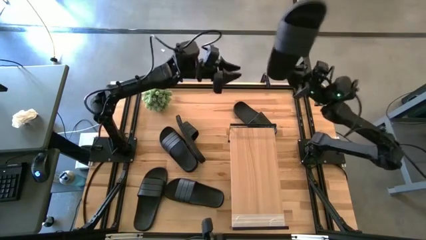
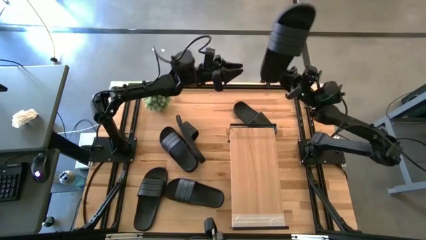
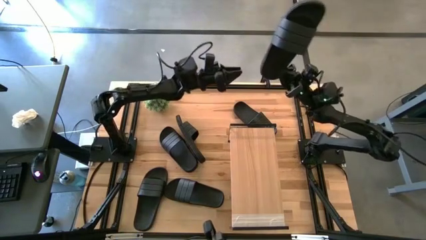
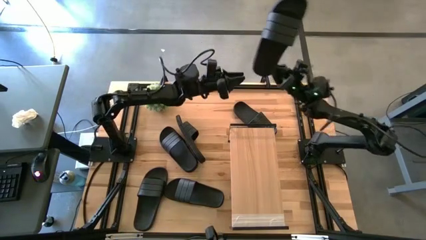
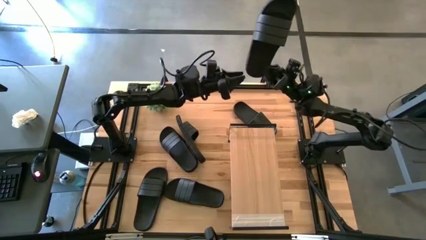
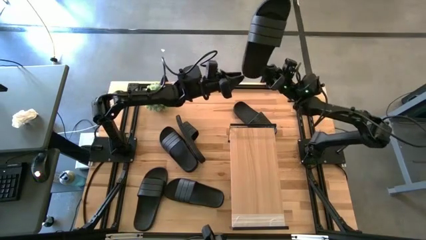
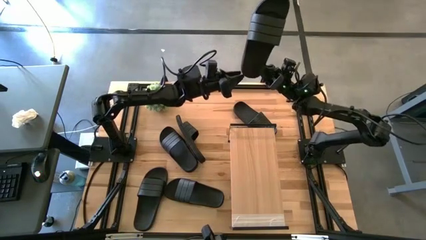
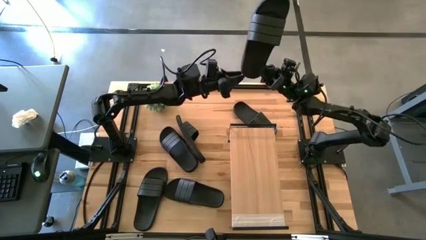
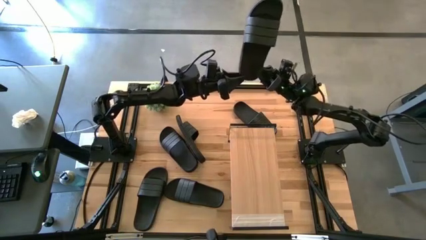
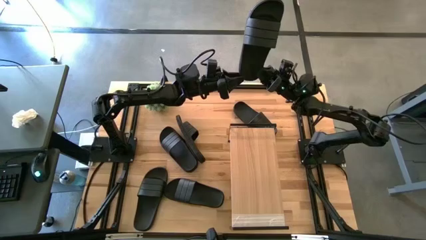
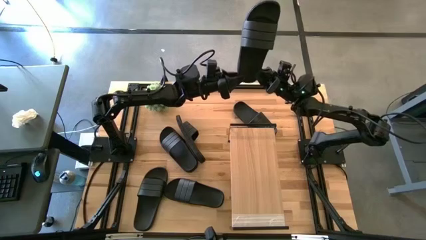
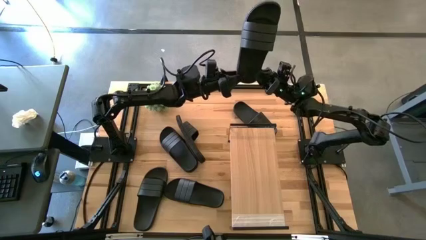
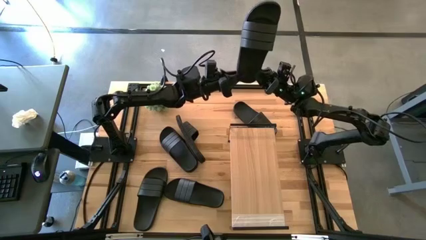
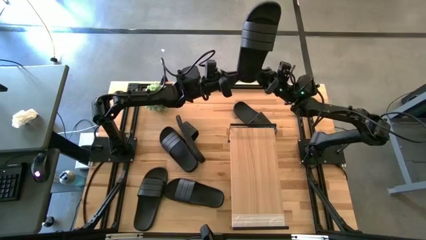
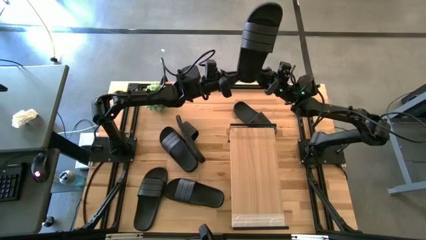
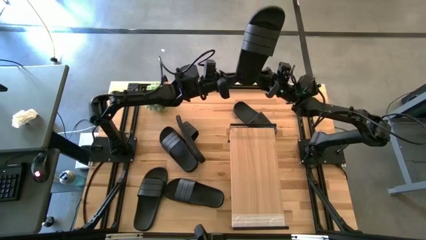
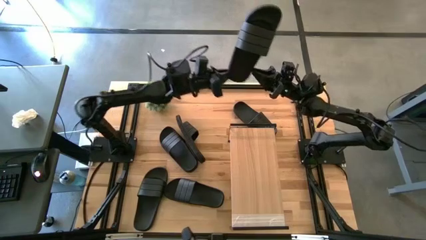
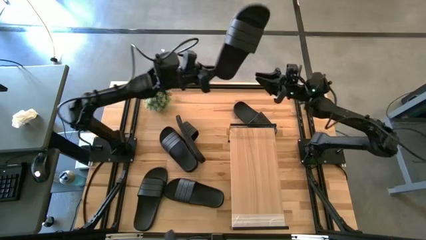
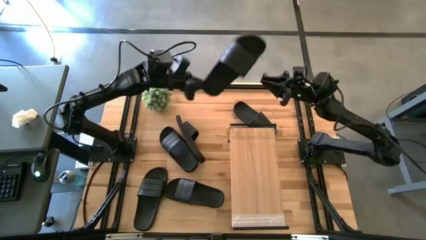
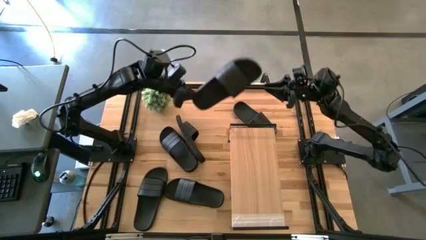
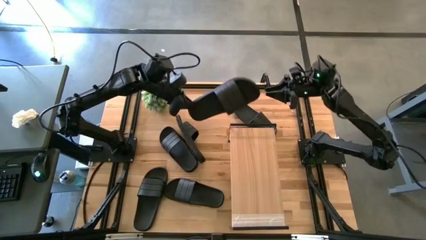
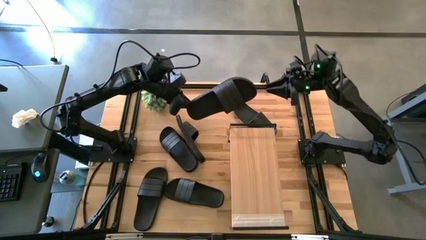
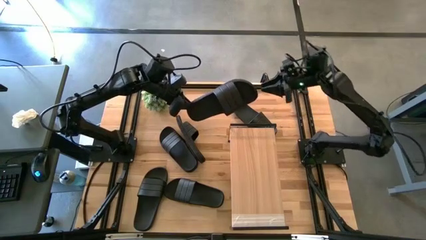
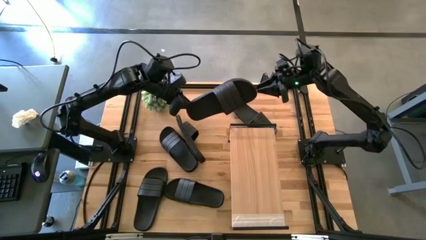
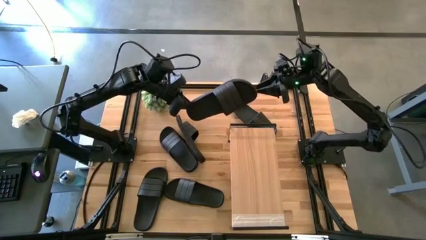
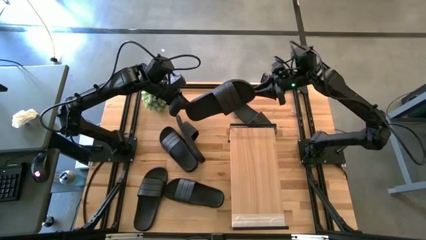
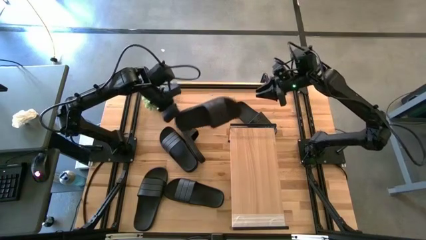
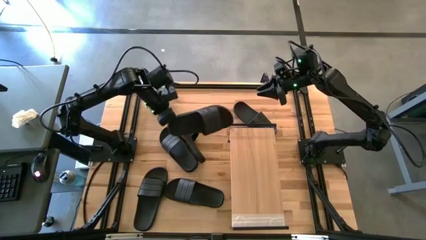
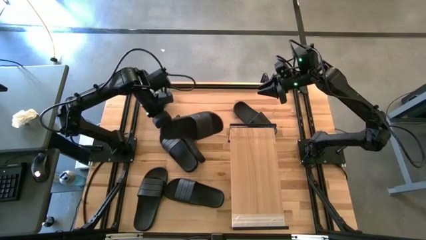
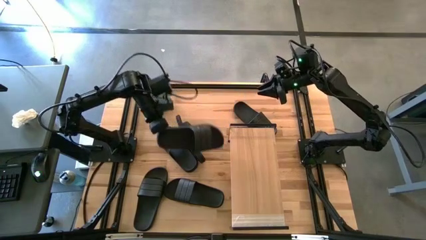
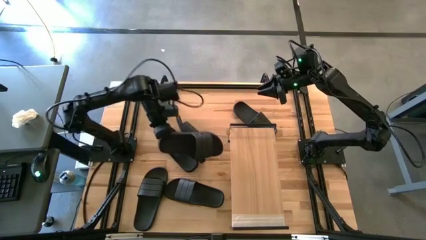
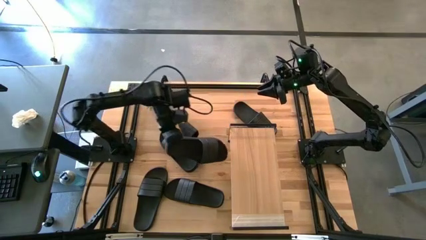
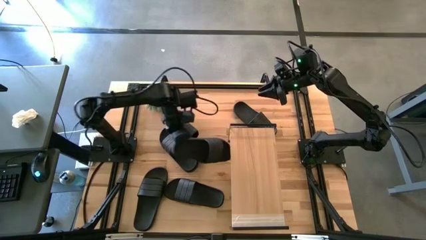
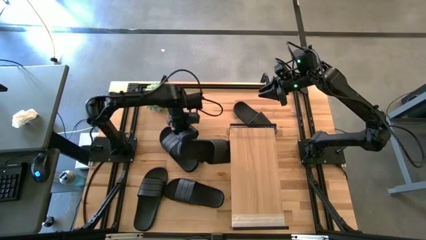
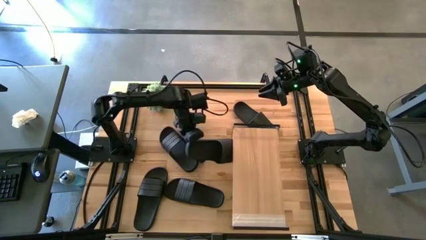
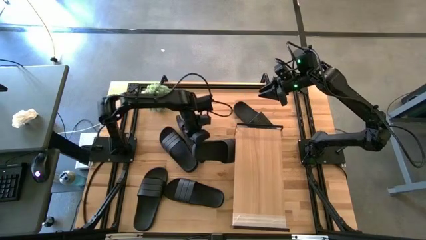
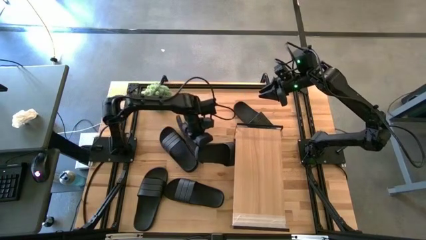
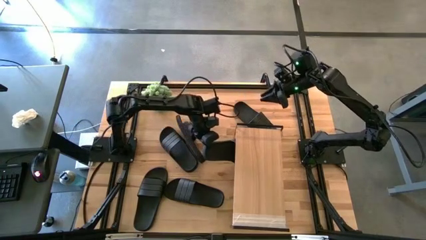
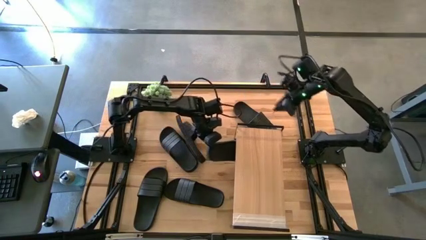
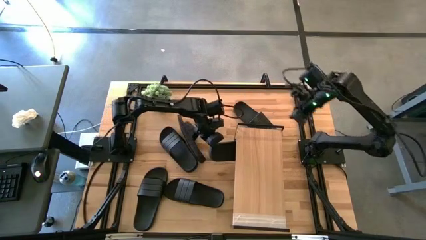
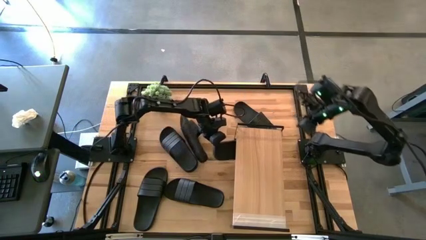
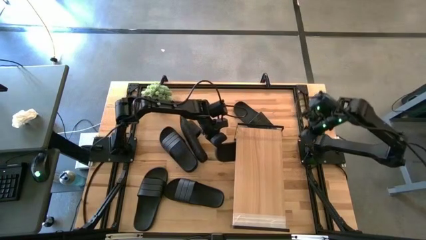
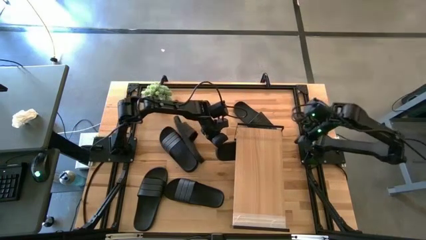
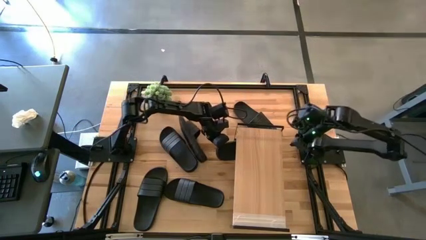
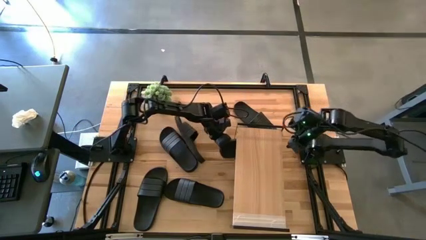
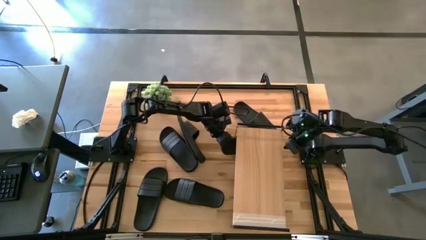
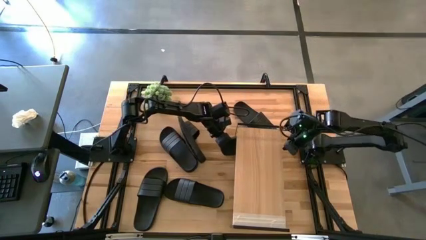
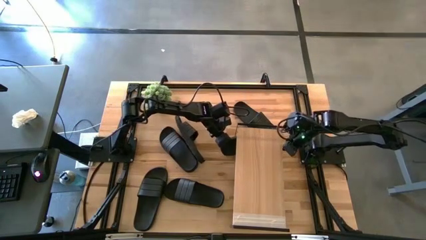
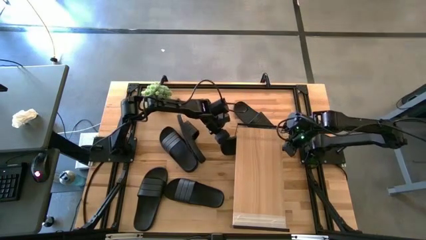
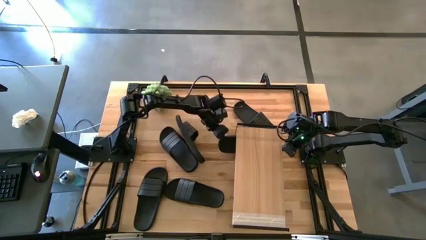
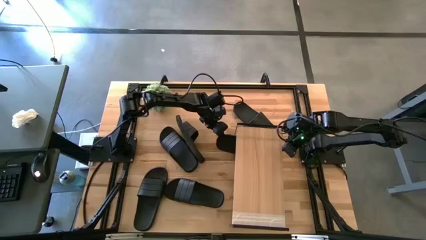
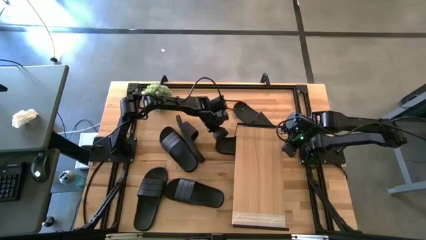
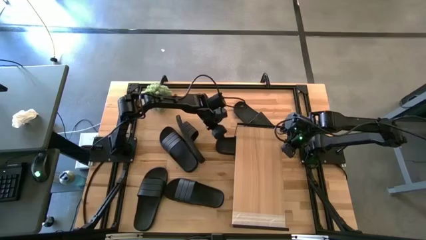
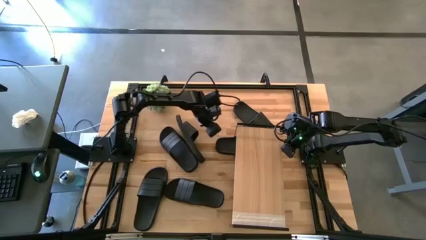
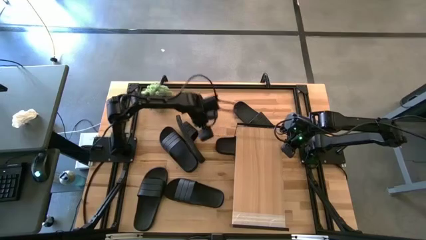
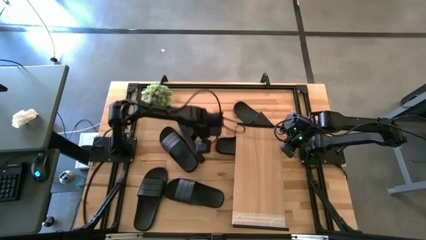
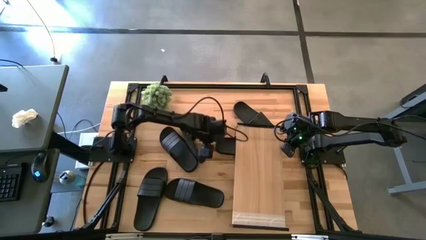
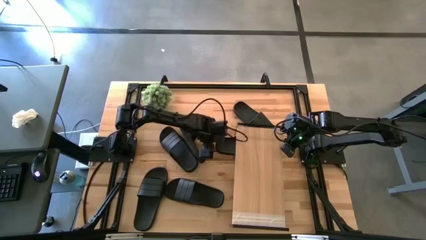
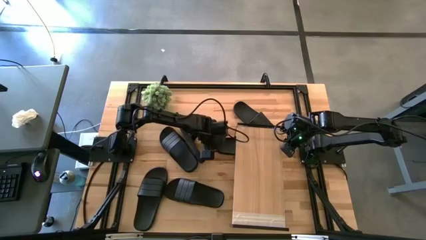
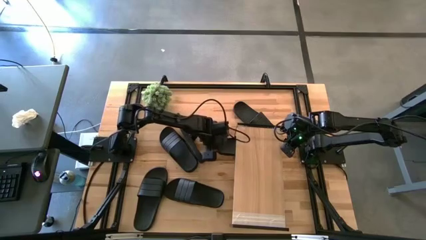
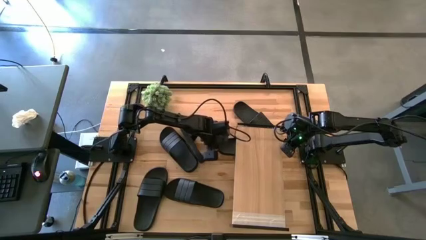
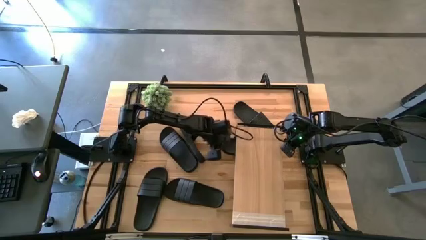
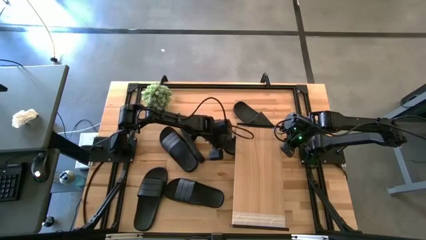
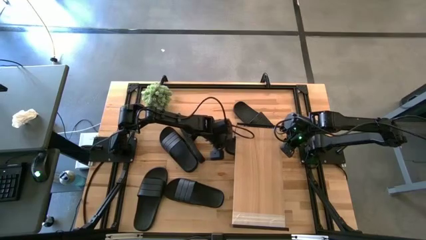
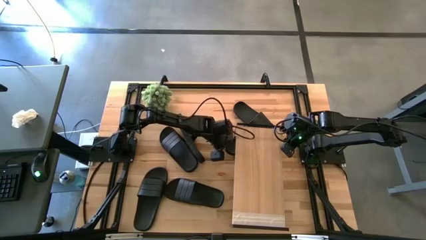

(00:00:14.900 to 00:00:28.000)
Task: Pick and place slides into the shelf
Put the black slide under the shelf
